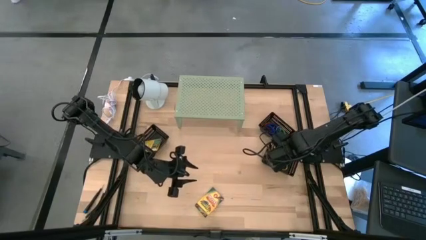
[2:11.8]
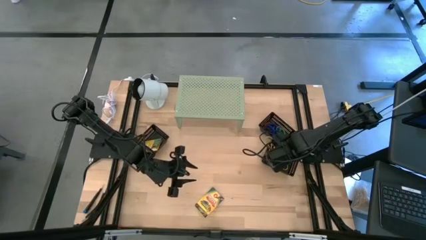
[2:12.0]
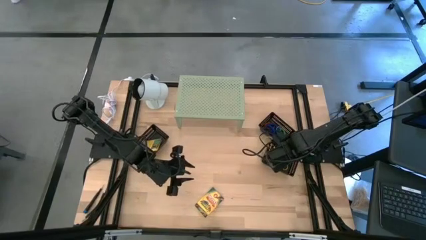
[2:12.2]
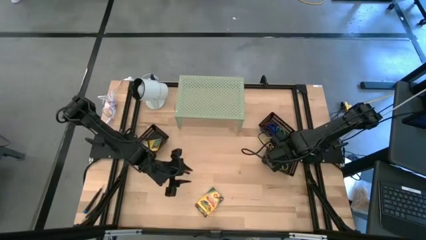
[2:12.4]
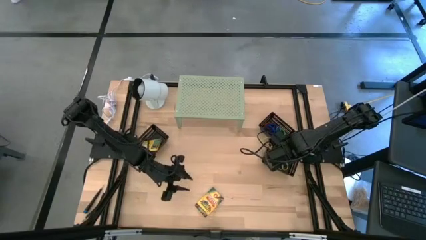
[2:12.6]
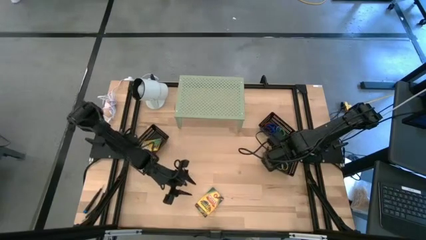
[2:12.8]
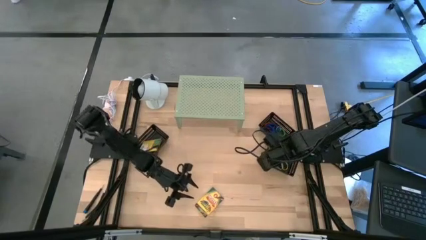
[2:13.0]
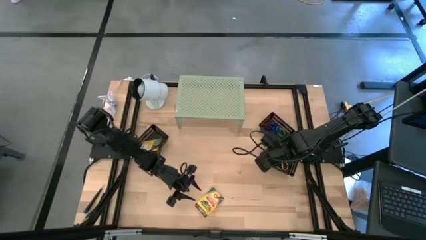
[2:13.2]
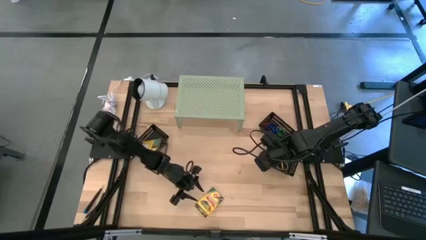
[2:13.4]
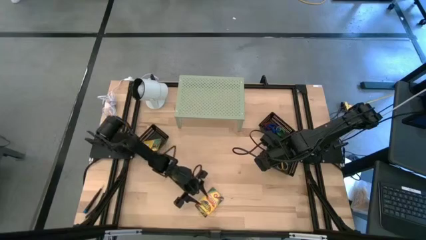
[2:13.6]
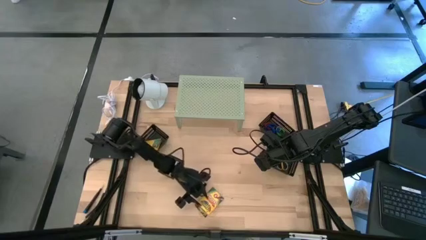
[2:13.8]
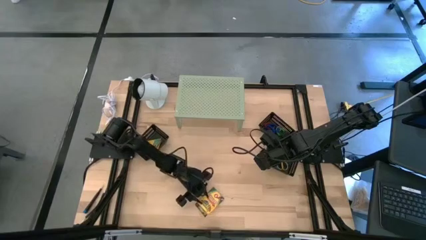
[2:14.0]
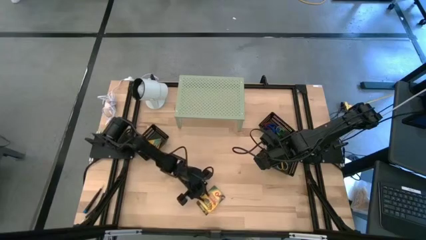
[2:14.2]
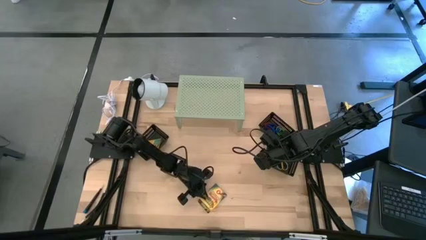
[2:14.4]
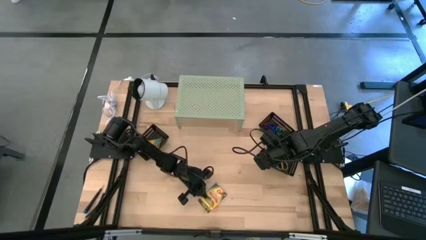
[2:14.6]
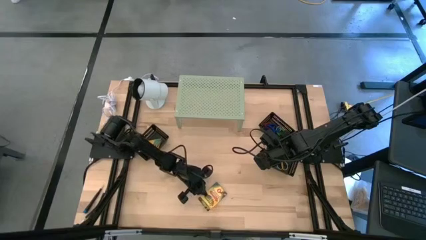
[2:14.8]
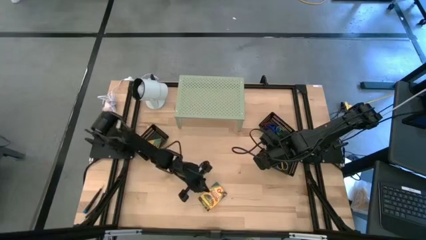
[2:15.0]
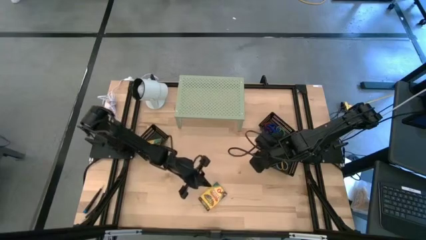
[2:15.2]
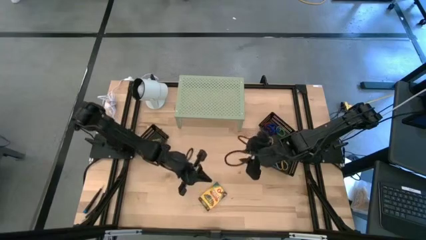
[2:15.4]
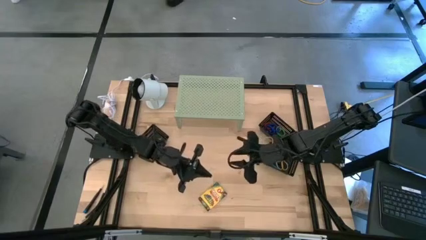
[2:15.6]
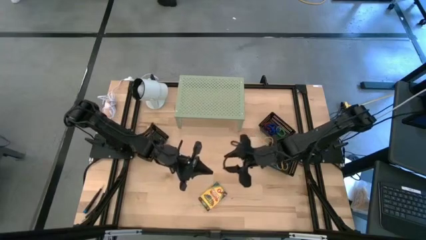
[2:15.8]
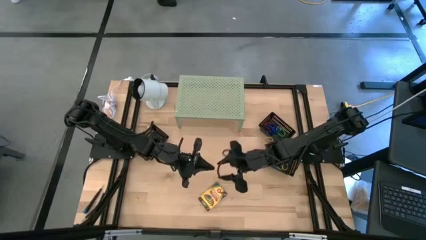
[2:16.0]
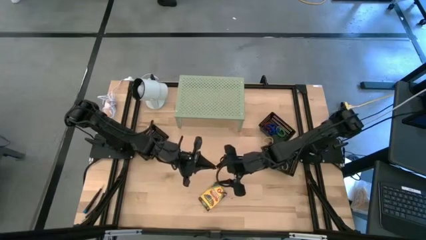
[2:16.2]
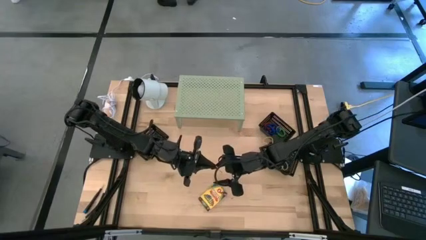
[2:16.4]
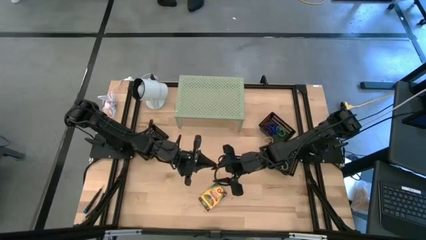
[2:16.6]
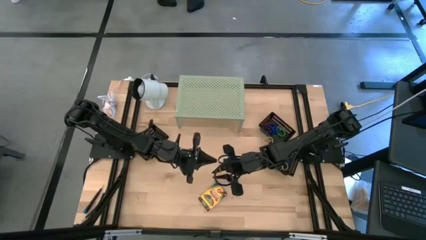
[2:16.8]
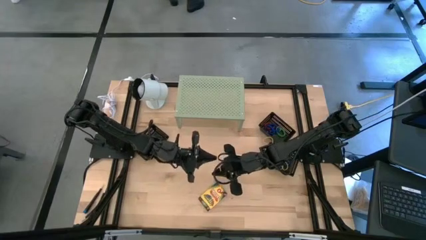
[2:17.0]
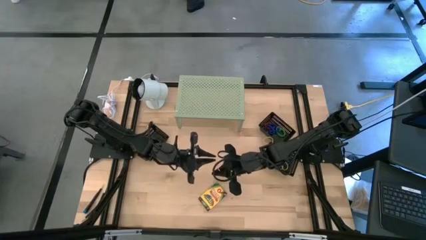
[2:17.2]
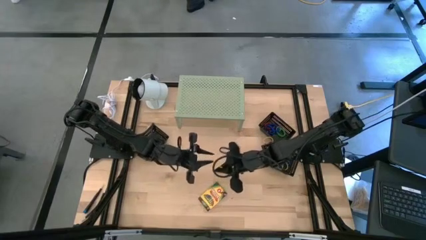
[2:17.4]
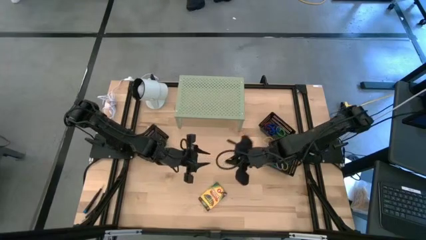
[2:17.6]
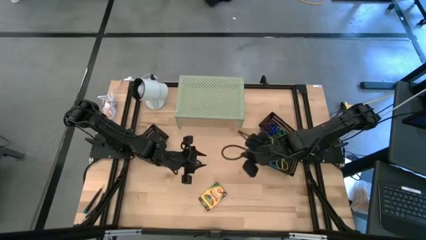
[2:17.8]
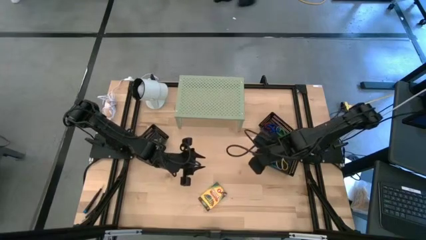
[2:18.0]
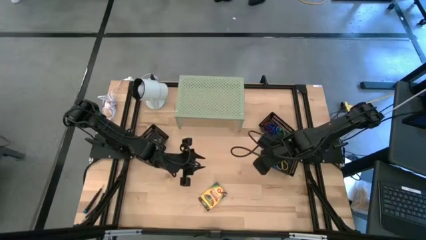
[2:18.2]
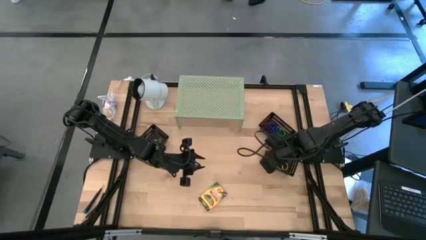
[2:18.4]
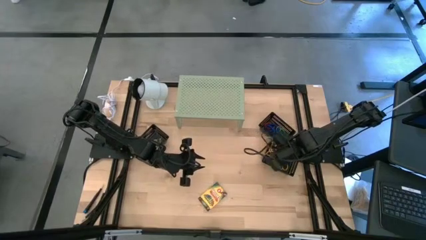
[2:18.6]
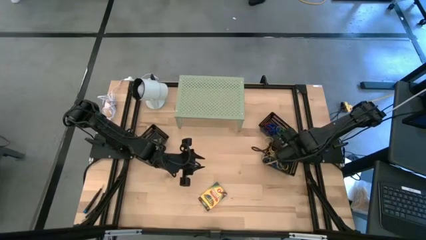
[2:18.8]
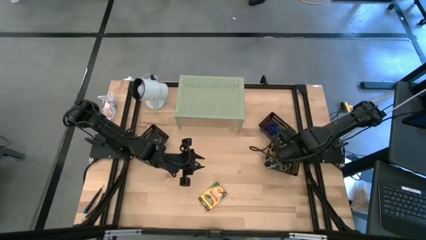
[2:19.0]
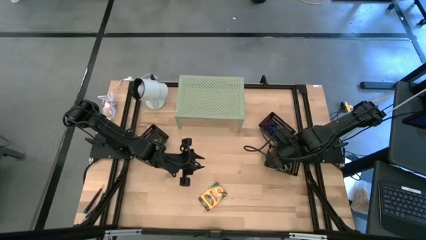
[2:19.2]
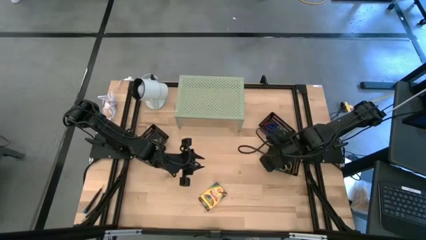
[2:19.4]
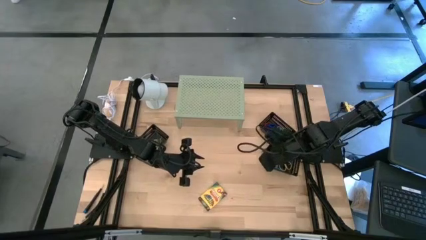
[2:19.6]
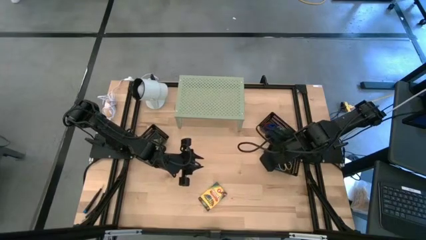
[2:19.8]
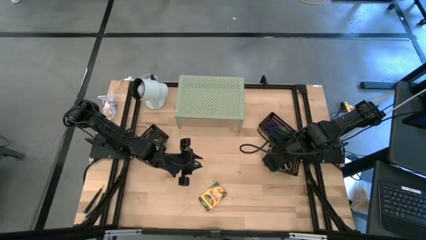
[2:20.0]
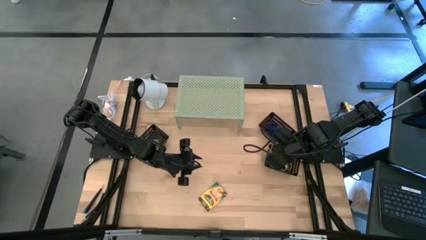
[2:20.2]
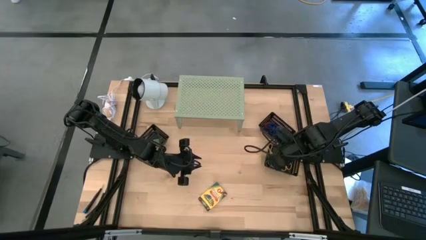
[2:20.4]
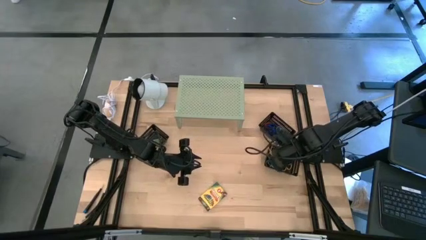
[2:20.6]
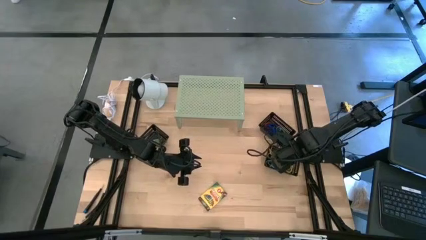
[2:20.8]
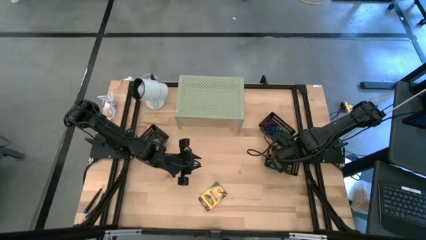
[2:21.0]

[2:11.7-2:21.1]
Task: Pick & Place Office Desk Supplies
Put the yellow rubber band into the bottom right black bin

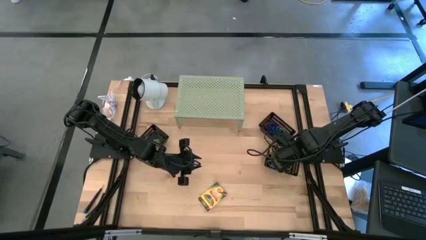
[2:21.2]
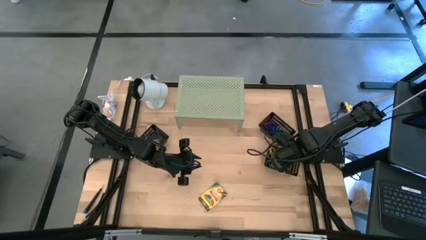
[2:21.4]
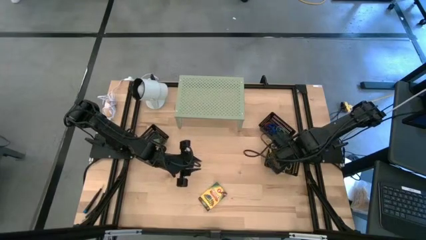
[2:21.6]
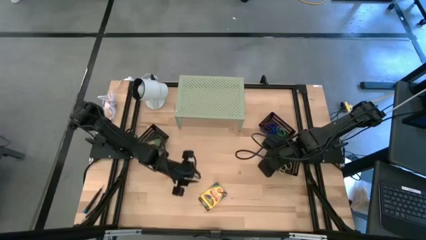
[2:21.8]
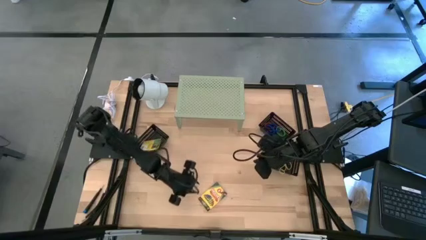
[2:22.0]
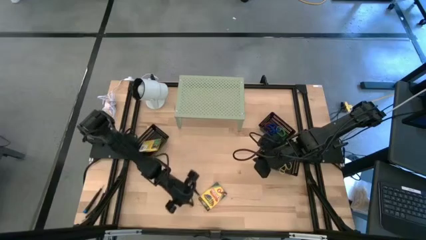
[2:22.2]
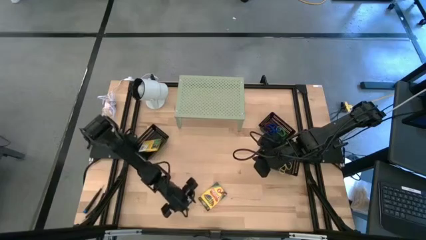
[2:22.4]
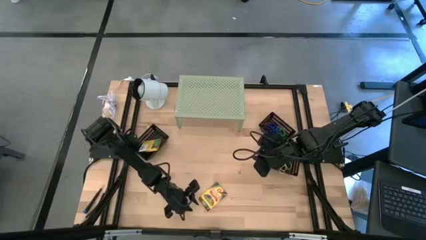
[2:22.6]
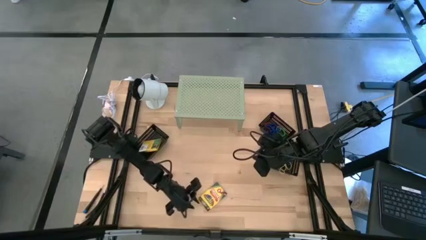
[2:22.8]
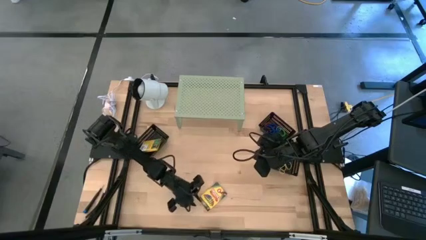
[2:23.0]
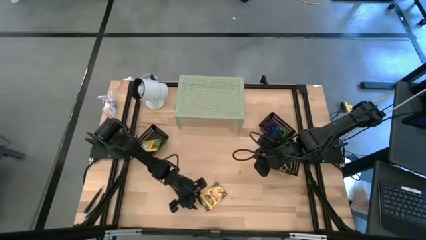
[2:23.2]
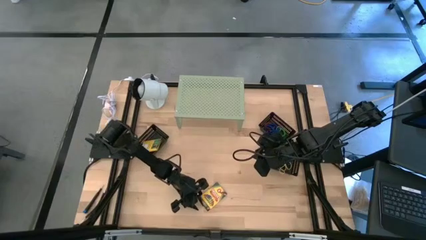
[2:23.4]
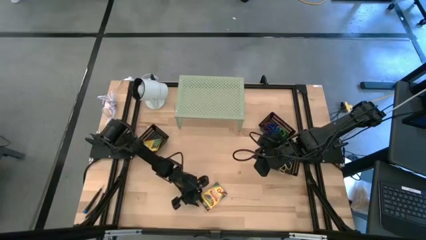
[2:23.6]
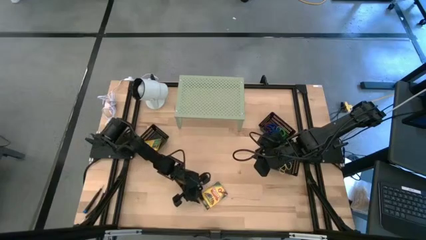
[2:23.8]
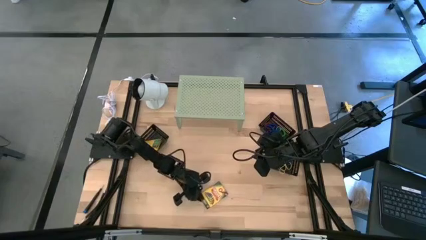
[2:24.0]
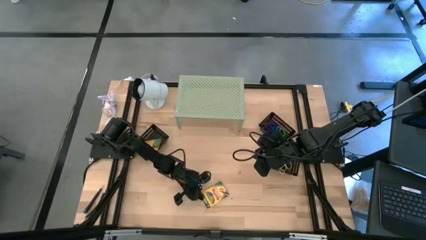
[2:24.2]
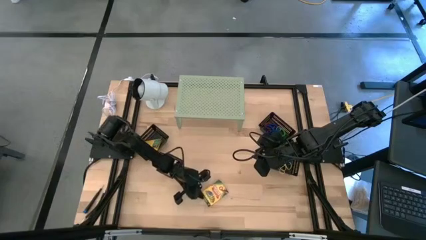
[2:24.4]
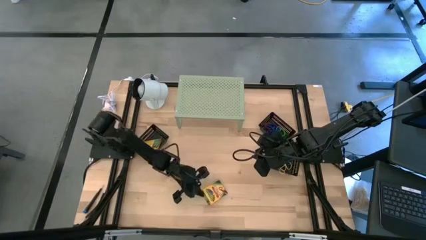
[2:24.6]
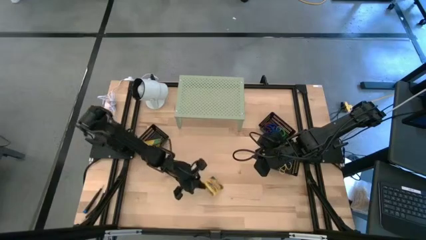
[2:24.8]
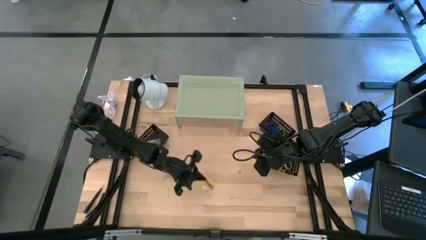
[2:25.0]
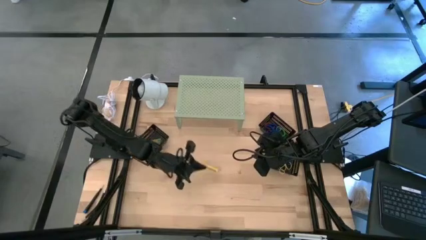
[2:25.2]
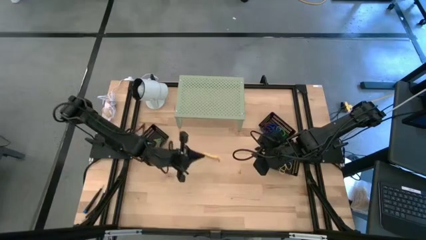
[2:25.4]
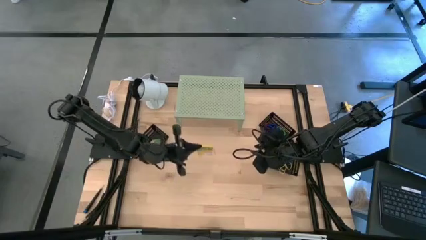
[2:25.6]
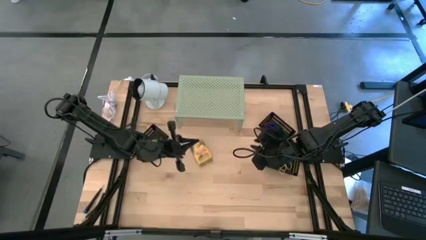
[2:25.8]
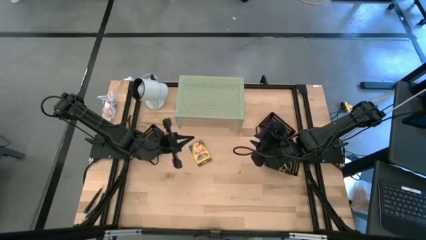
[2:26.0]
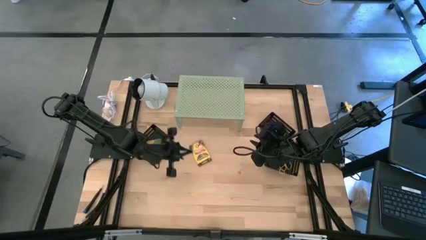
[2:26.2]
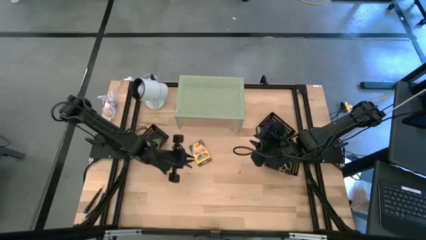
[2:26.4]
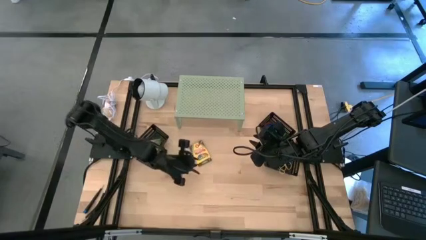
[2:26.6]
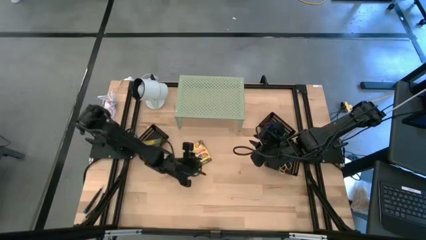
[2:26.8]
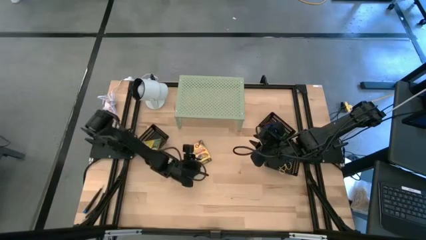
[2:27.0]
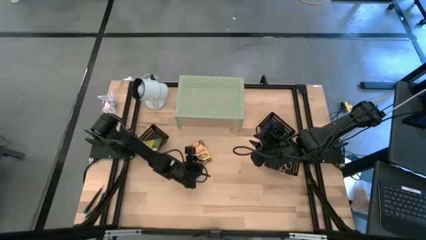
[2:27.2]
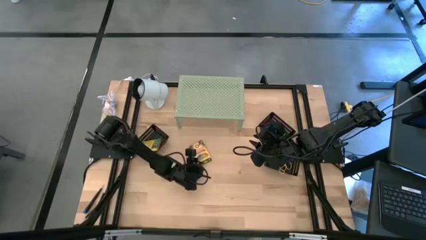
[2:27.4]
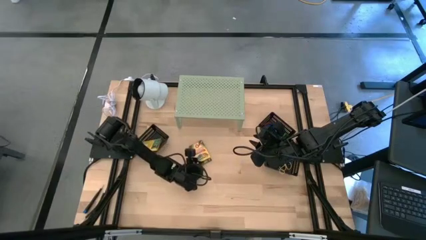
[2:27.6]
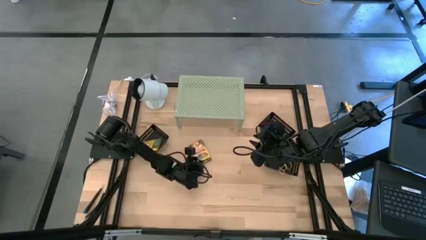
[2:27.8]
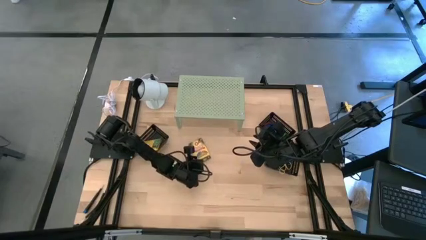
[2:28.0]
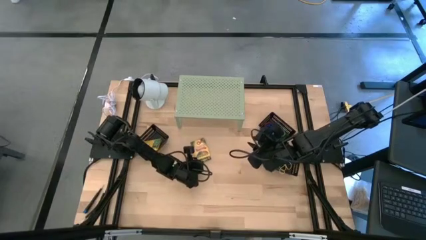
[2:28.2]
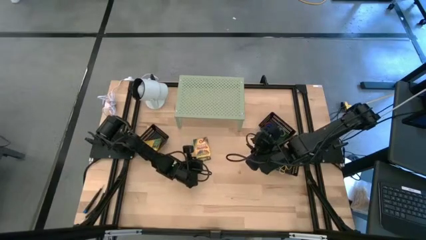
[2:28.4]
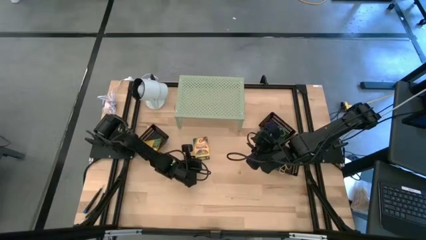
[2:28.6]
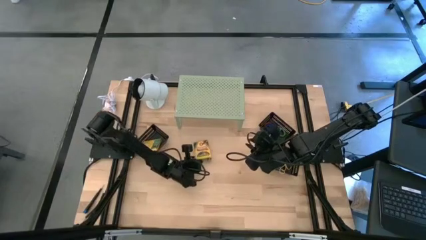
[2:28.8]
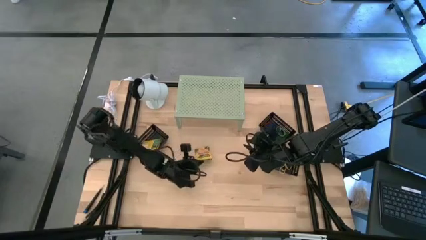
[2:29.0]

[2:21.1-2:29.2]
Put the yellow crayon box into the bottom left black bin
